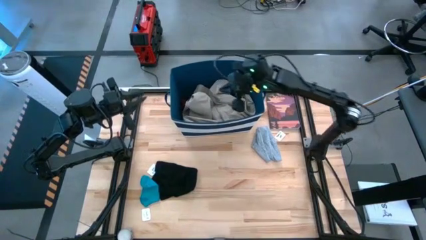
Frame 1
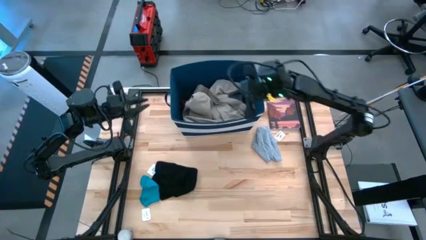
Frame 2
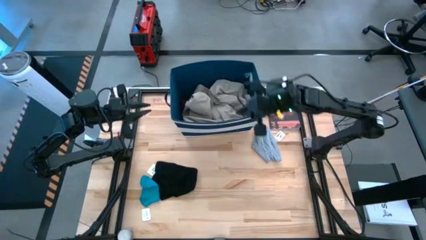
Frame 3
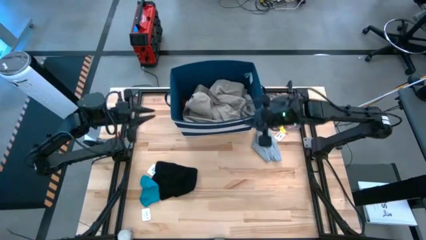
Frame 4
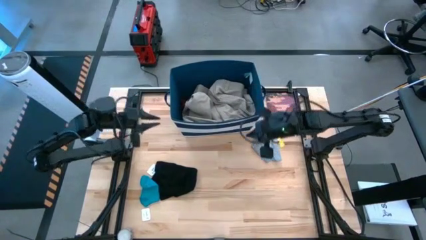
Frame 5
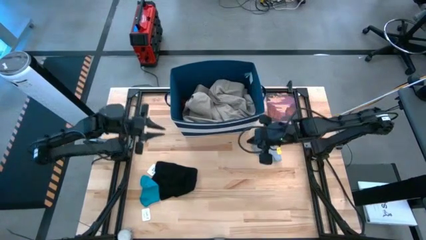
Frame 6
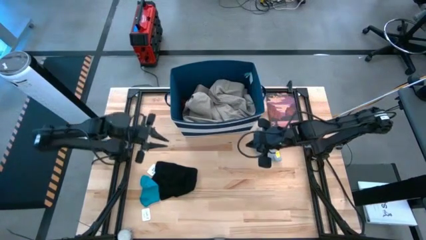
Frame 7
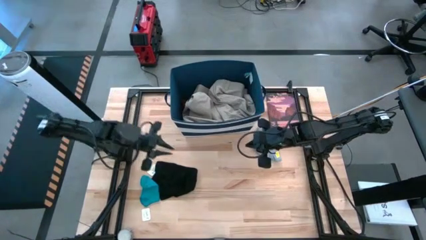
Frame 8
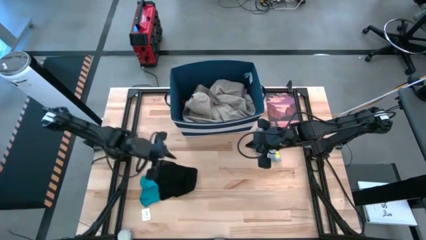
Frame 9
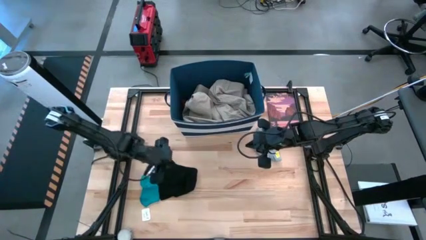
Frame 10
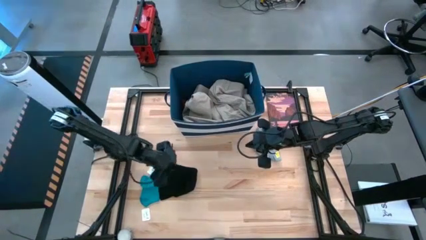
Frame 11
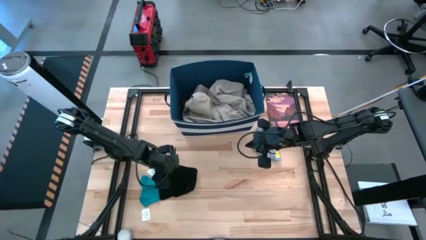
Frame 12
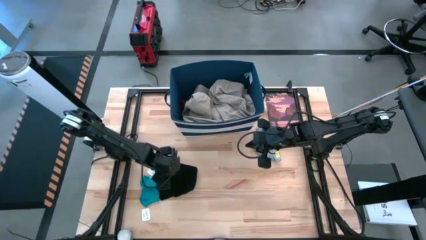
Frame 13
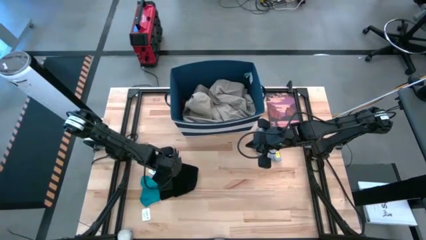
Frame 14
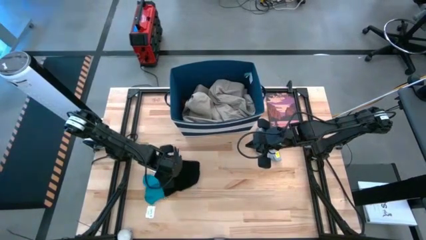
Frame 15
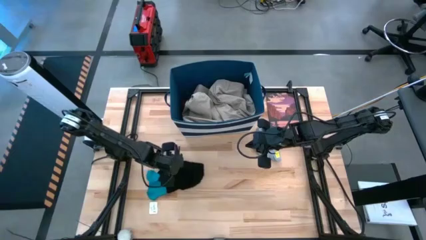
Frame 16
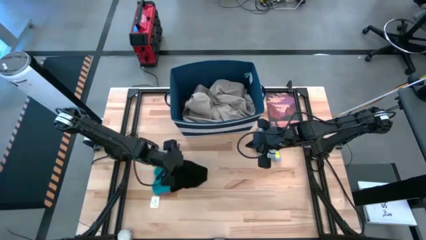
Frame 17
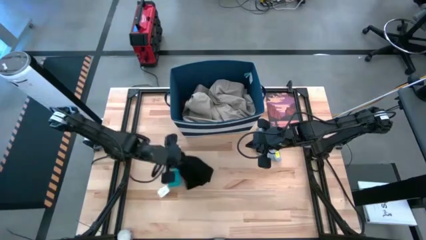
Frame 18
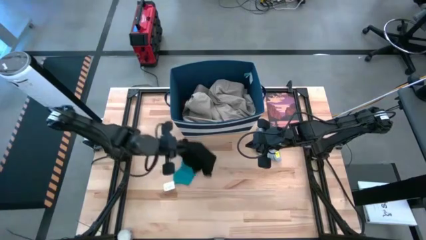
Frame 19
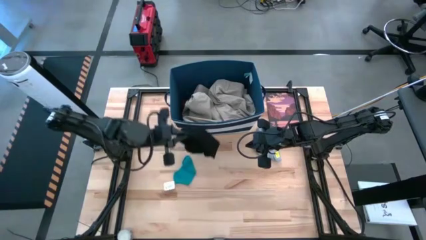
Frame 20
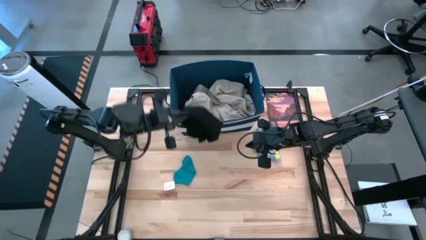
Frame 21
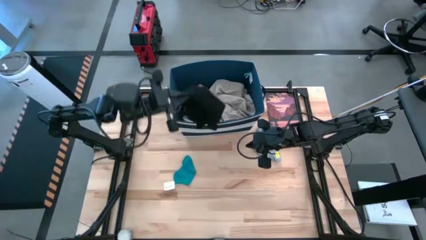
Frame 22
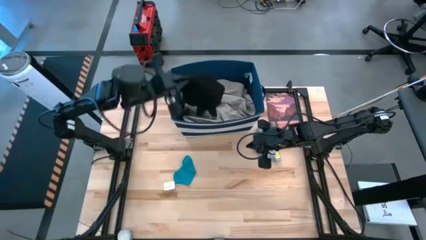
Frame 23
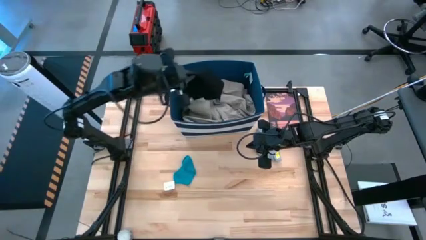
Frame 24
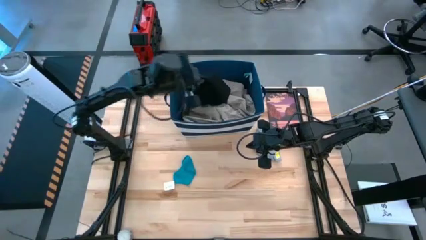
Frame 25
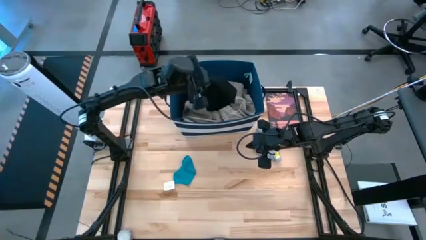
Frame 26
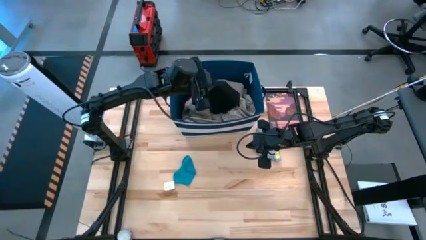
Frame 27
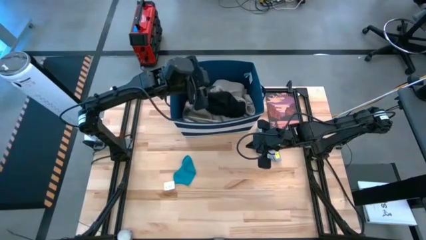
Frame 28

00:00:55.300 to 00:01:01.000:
Task: Sort clothes
Put the black underwear into the blue laundry bin

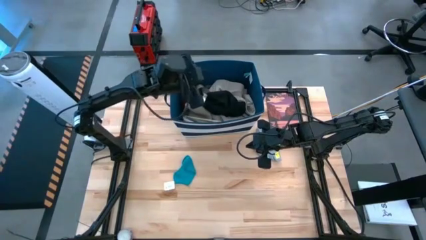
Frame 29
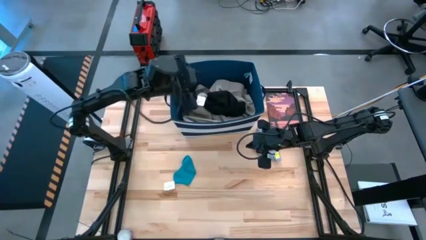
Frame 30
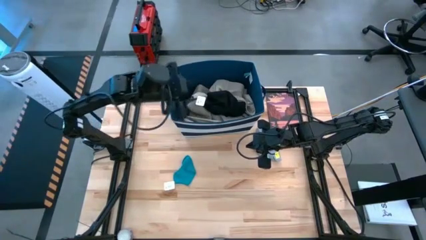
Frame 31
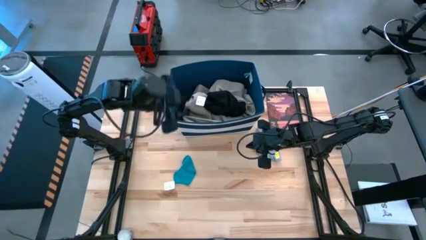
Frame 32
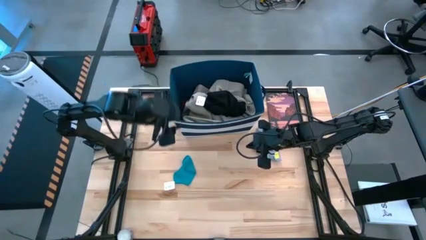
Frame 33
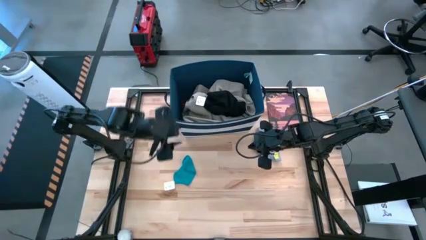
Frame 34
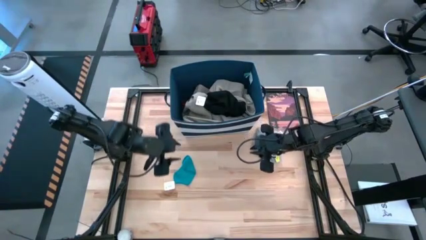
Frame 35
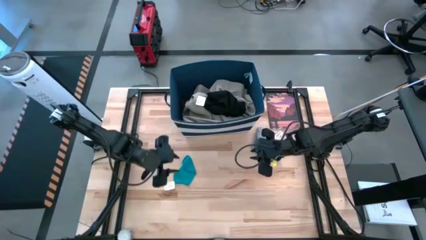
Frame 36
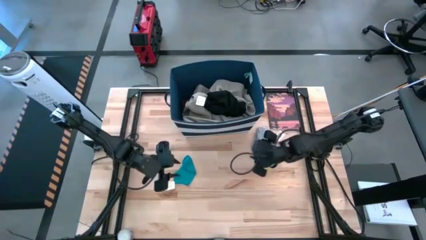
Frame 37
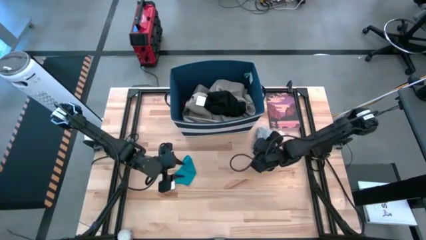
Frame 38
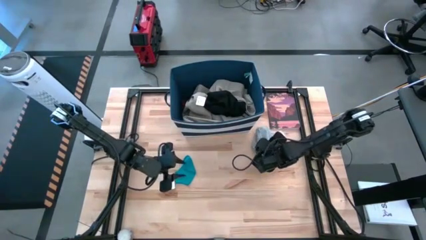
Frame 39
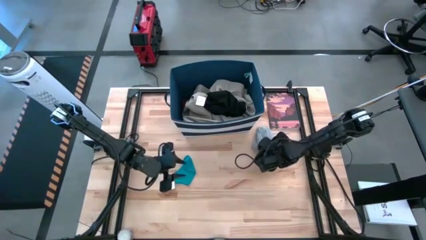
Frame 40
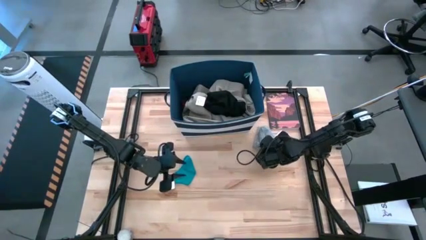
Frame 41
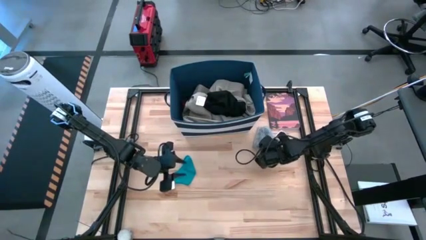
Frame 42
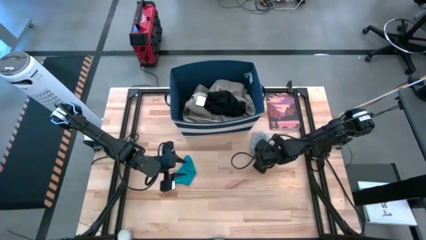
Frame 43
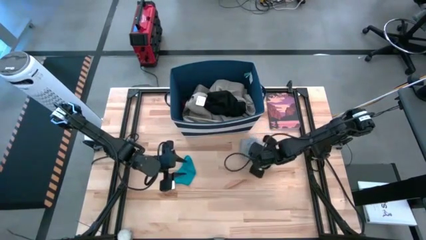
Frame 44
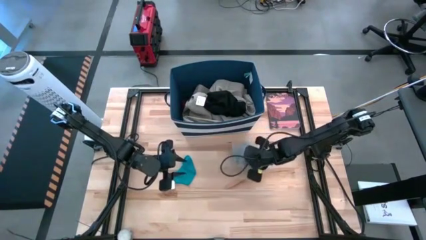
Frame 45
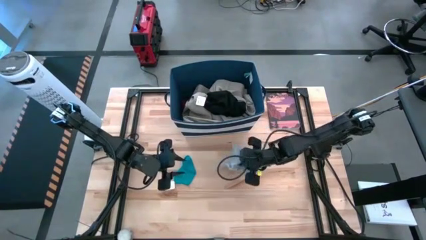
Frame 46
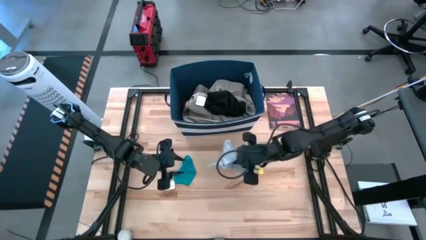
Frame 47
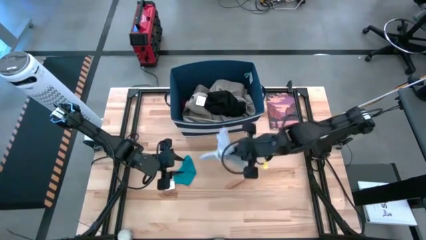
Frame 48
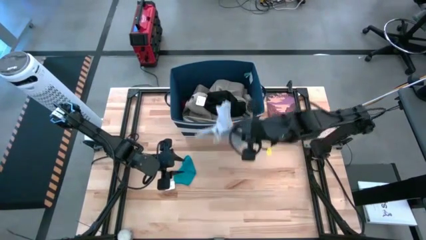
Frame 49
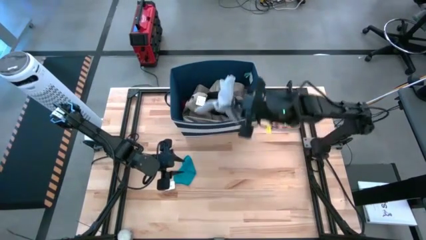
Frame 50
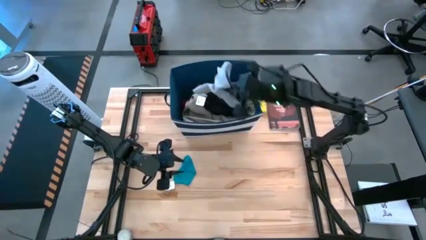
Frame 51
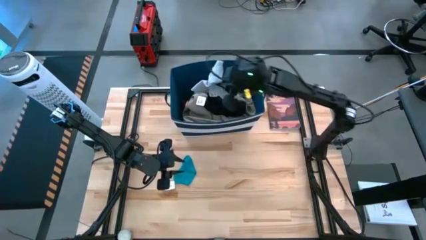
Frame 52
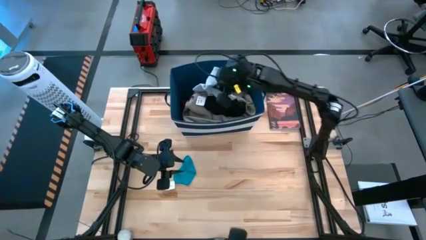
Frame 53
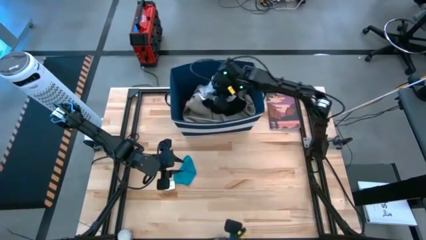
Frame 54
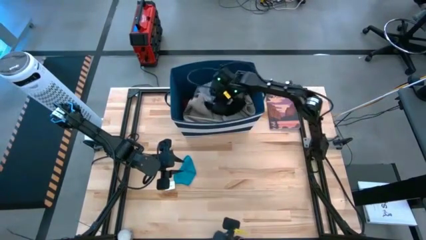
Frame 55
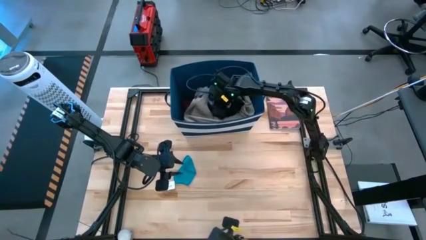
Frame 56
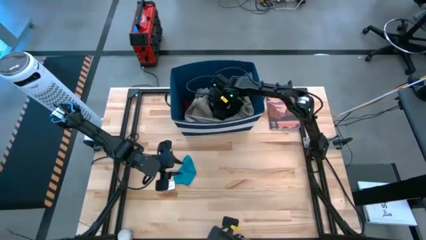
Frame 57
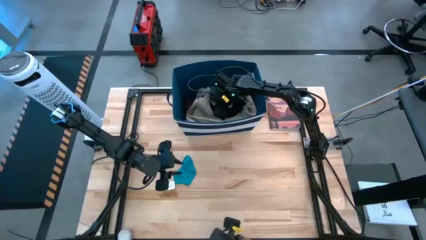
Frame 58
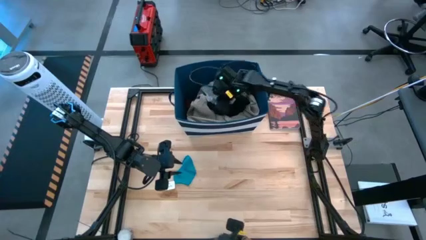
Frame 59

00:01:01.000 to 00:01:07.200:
Put the gray underwear into the blue laundry bin

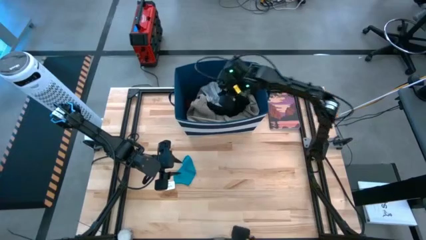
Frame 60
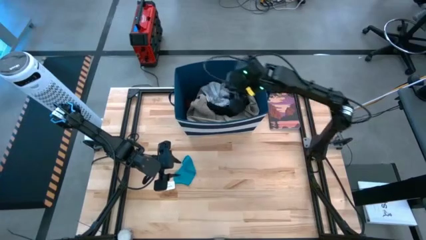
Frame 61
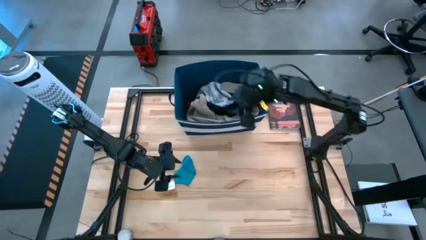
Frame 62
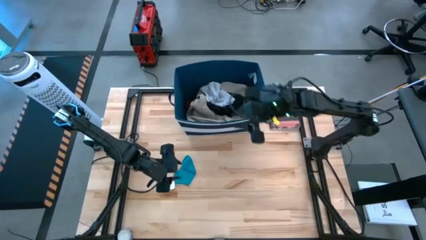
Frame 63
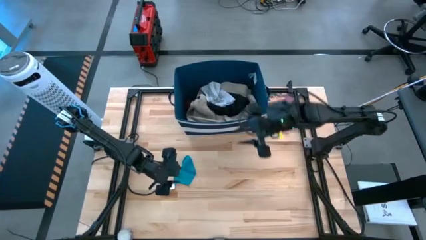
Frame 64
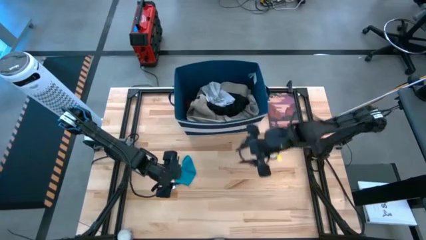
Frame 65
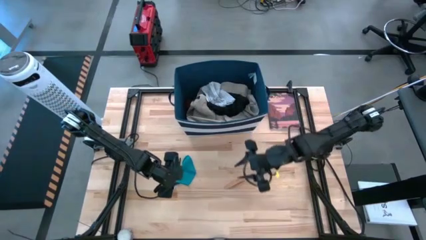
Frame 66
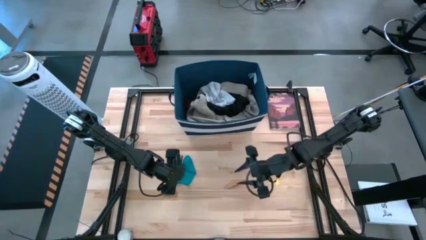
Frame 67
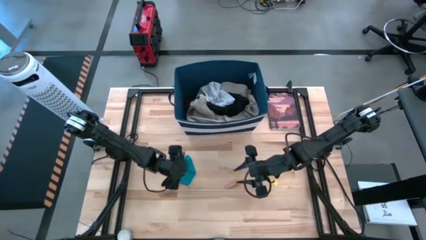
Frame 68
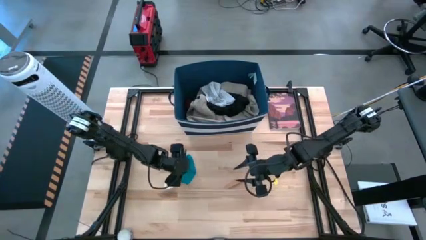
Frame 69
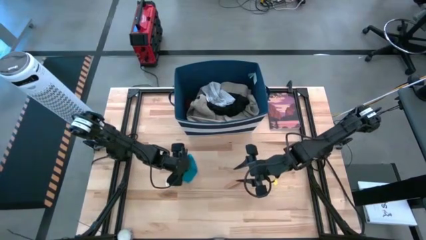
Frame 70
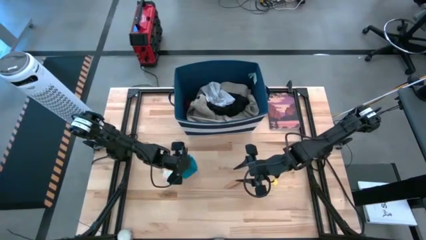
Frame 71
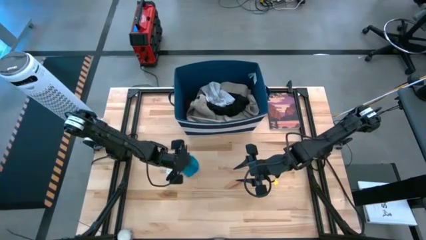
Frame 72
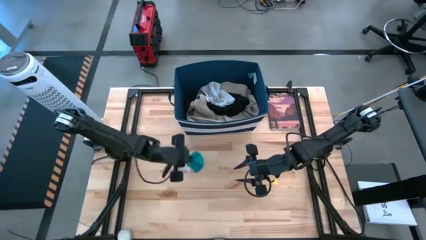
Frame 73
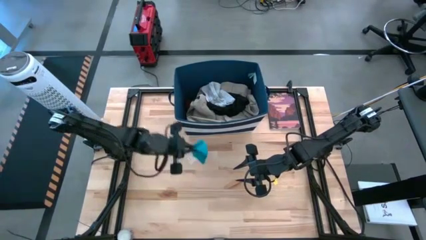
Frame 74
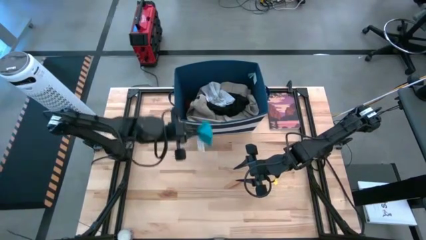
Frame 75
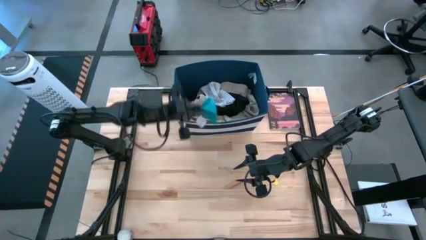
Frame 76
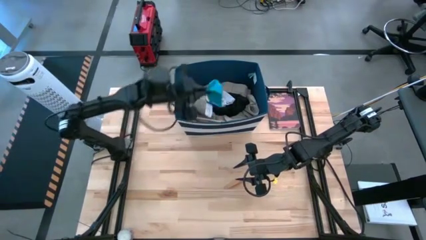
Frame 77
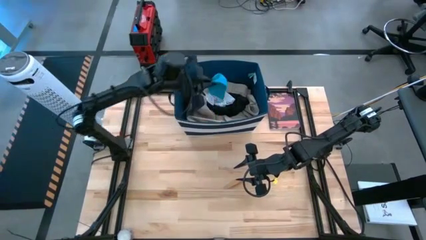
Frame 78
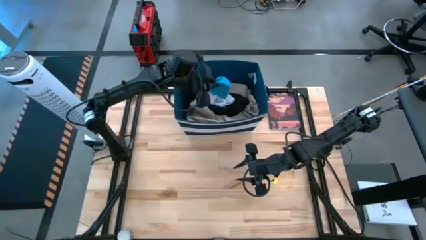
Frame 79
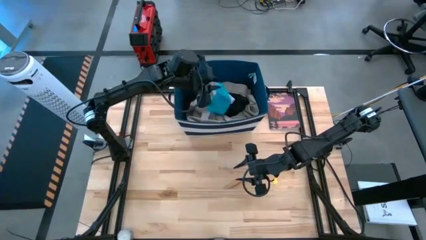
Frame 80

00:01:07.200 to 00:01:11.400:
Put the blue sock into the blue laundry bin
